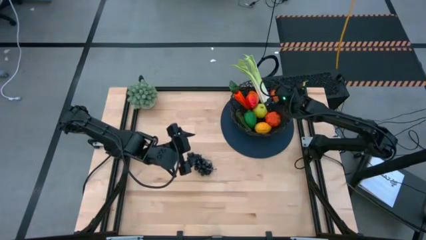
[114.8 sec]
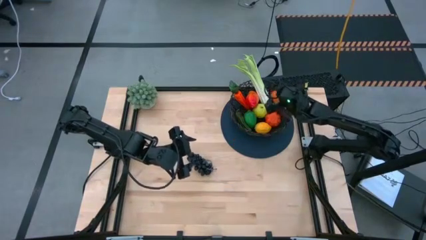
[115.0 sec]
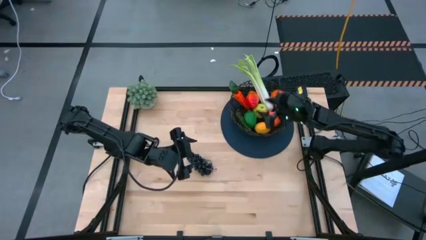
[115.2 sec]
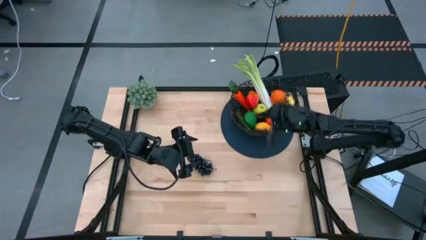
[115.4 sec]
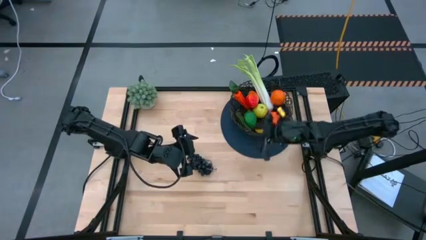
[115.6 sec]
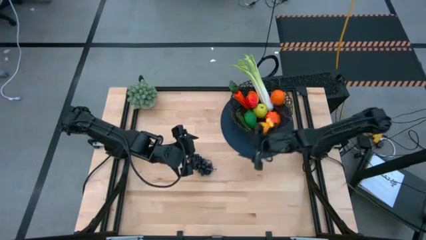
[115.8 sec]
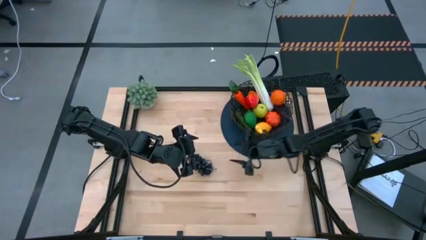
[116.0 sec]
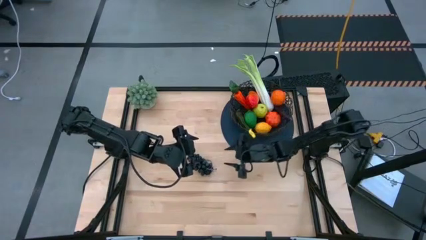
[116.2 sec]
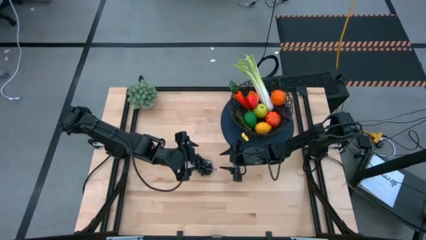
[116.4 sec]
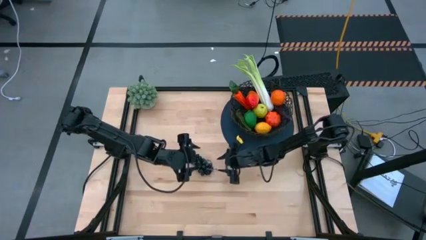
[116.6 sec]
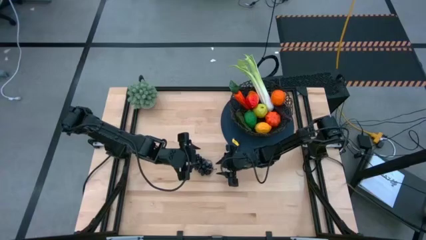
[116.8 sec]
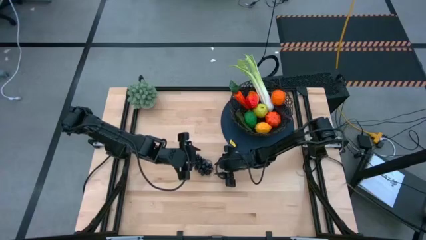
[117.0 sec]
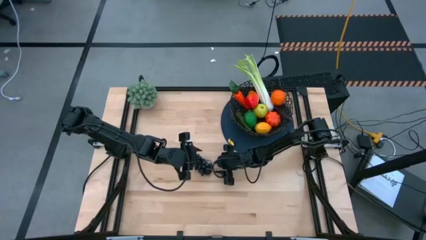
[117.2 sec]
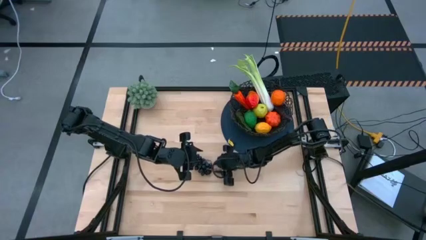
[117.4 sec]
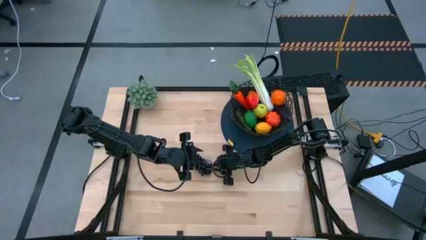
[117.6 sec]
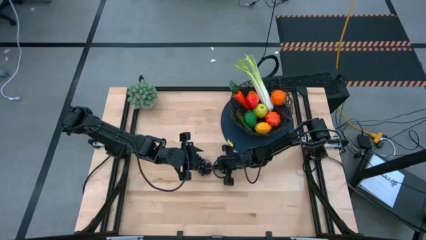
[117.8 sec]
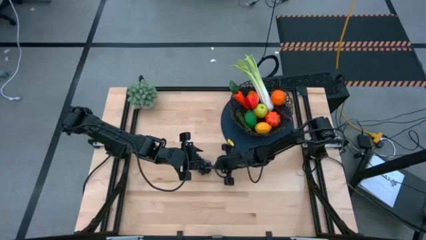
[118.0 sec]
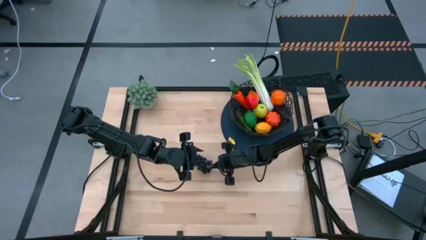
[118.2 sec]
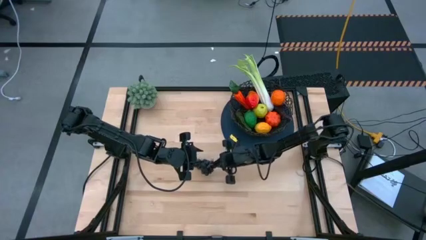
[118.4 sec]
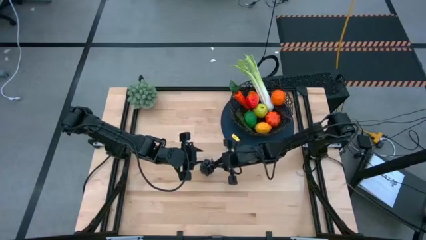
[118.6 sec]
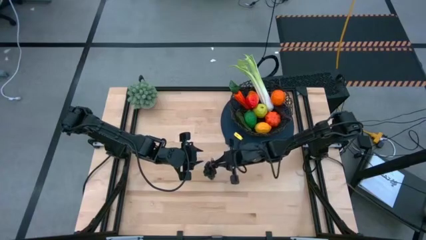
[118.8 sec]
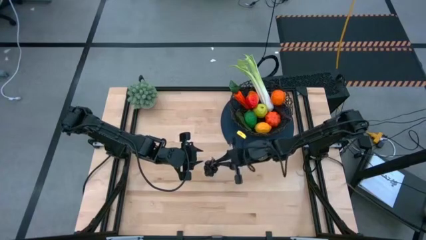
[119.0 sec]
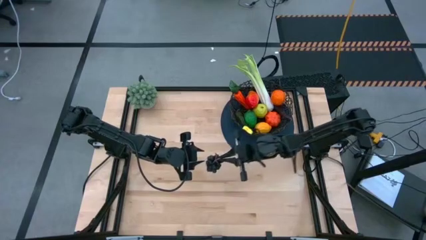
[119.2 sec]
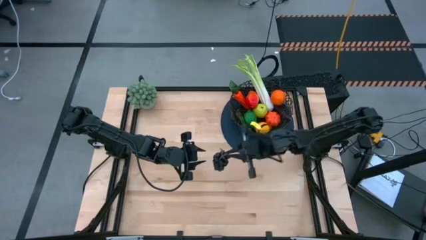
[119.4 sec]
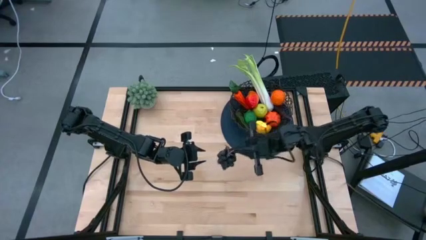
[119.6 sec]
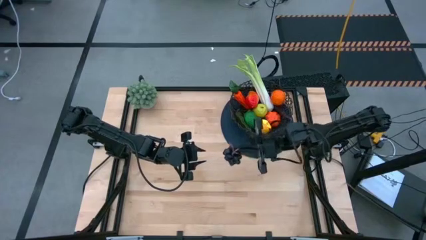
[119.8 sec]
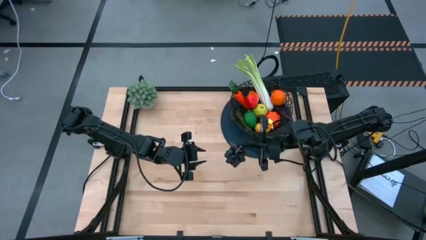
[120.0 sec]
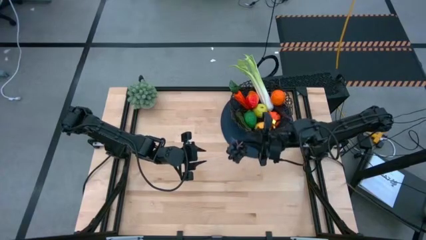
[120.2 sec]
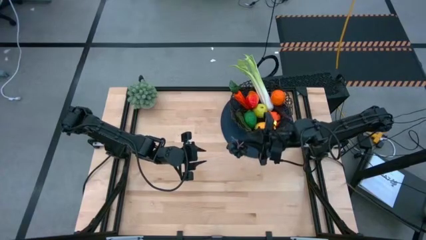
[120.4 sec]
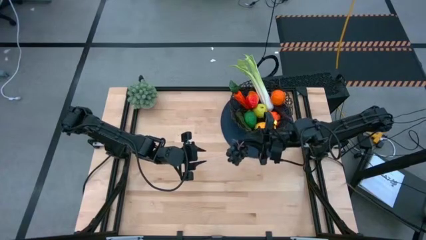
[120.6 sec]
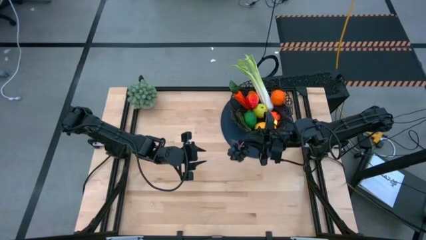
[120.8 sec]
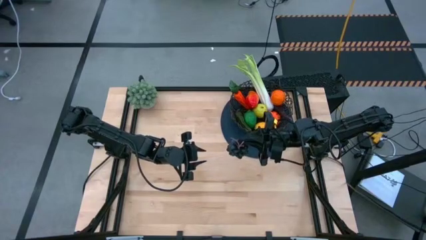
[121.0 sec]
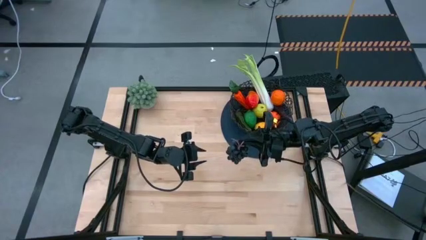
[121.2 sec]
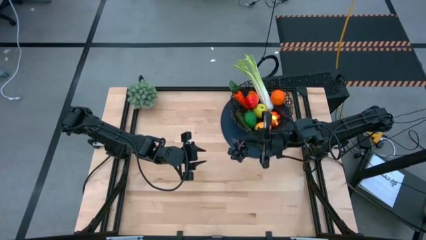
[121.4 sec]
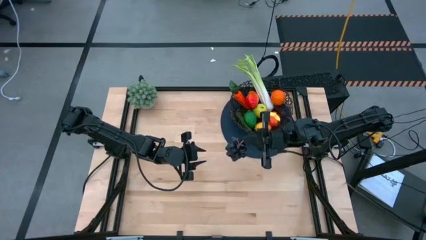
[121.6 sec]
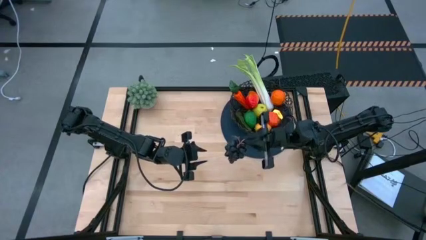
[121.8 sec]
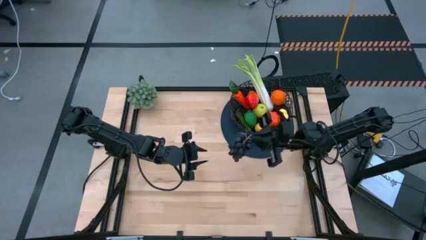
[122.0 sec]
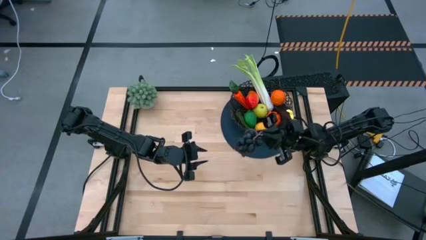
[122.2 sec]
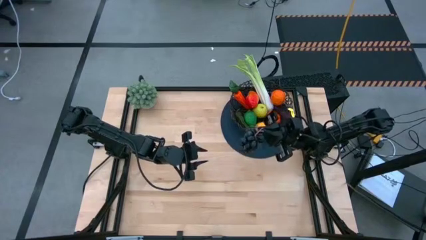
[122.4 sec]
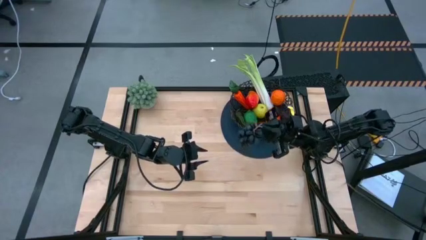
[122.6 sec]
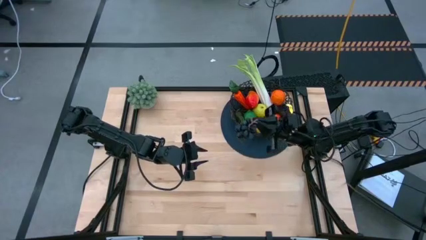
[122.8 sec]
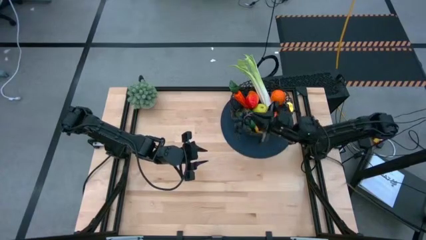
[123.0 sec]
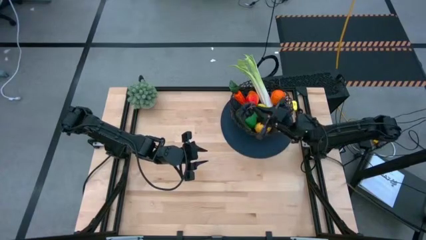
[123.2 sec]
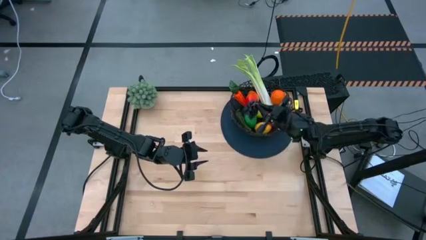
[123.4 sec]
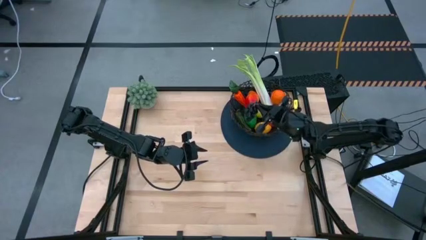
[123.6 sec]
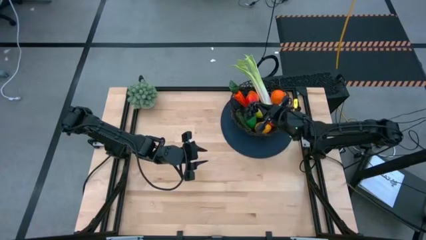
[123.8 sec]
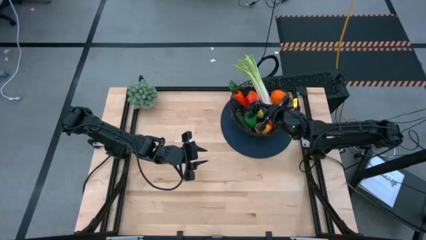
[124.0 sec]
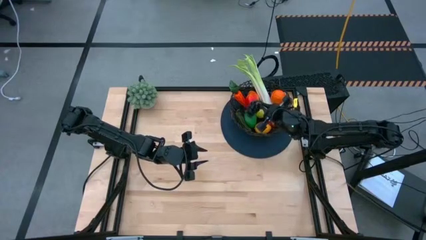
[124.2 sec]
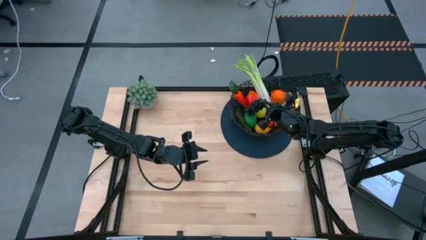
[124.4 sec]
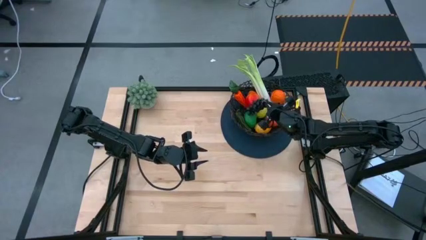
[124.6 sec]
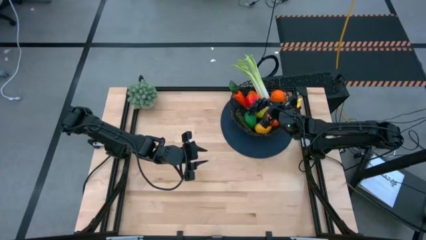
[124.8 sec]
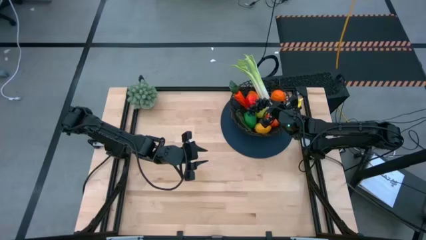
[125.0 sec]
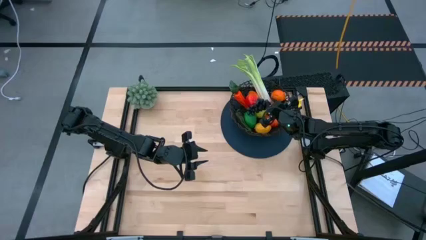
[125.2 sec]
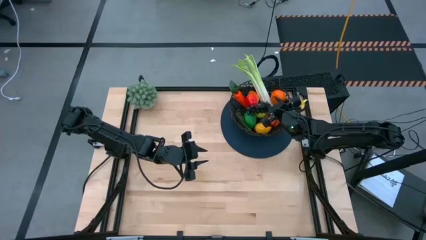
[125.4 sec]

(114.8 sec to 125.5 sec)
Task: Build produce basket
Put the black grapes into the black wire basket
